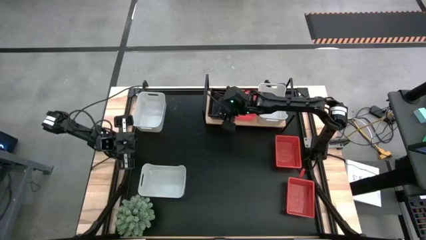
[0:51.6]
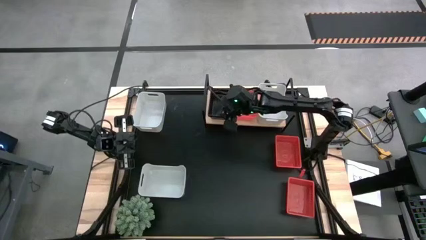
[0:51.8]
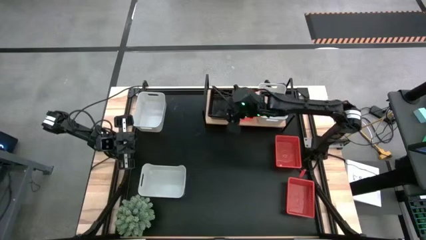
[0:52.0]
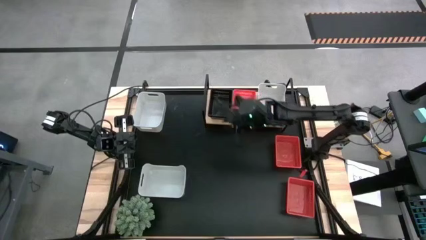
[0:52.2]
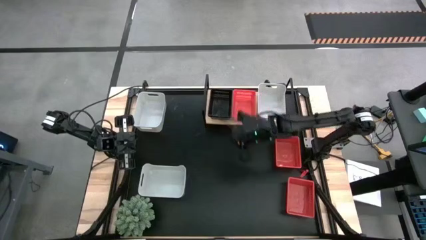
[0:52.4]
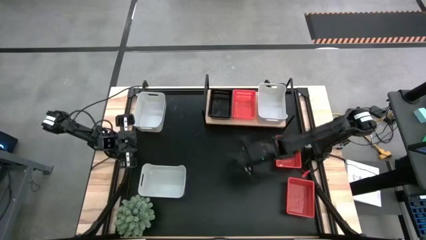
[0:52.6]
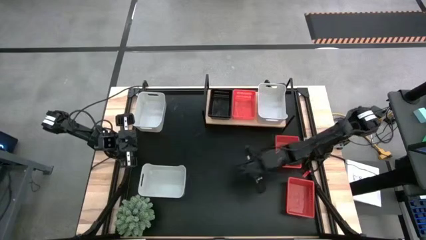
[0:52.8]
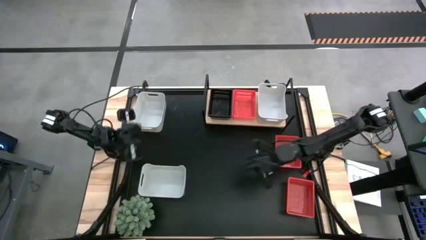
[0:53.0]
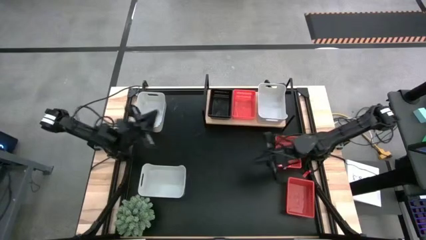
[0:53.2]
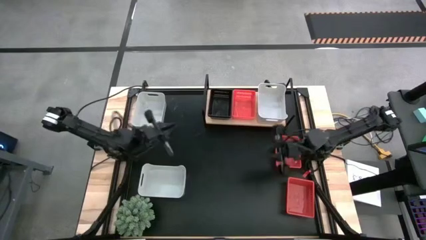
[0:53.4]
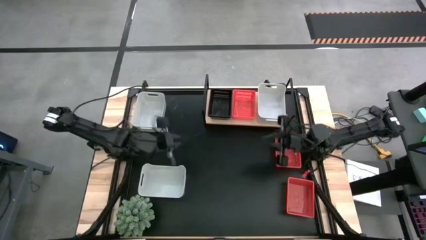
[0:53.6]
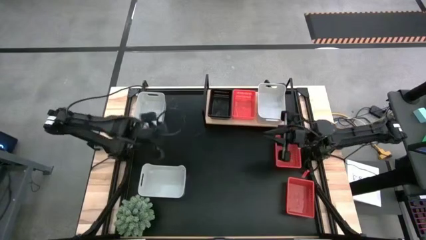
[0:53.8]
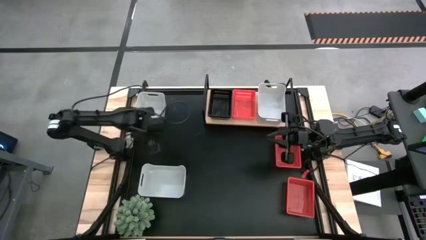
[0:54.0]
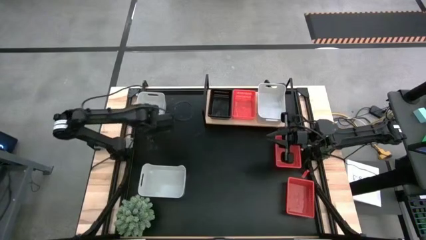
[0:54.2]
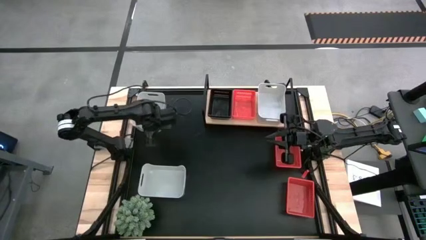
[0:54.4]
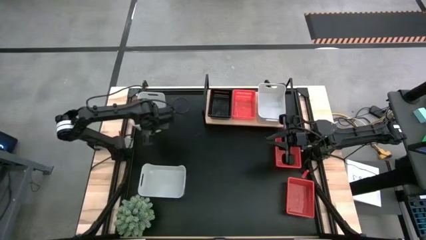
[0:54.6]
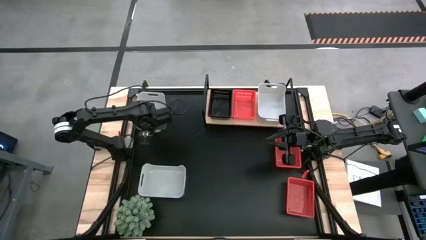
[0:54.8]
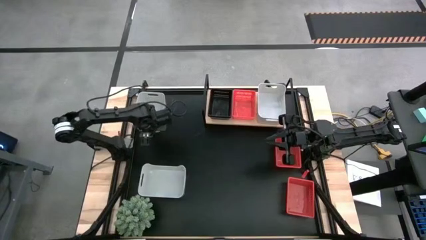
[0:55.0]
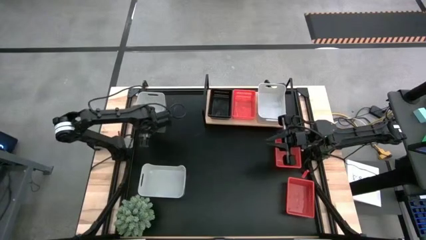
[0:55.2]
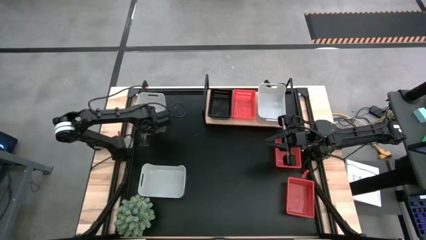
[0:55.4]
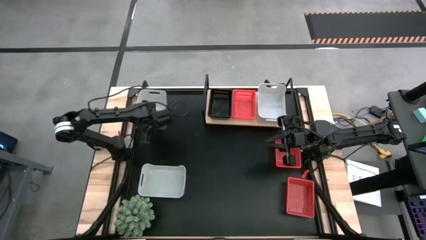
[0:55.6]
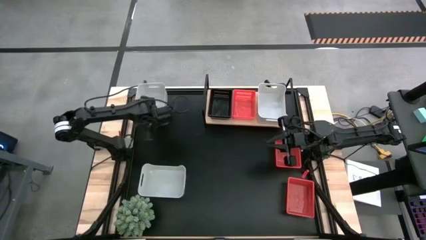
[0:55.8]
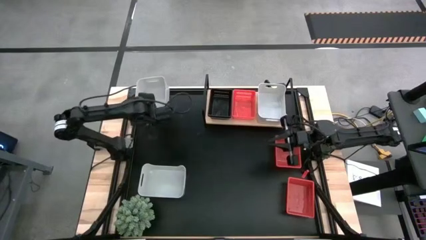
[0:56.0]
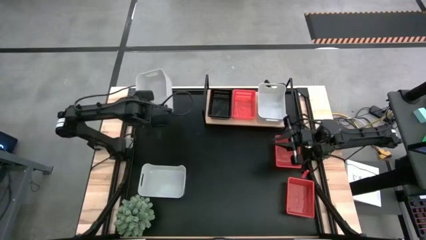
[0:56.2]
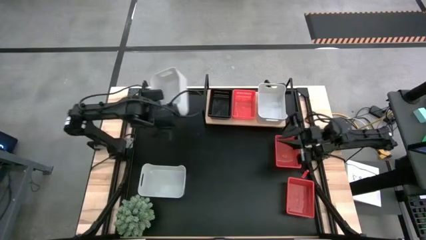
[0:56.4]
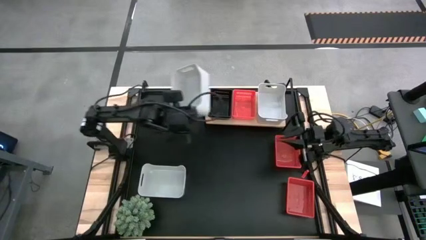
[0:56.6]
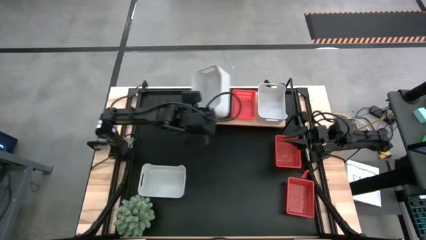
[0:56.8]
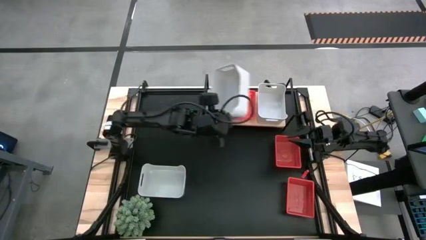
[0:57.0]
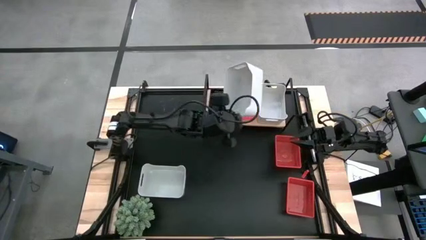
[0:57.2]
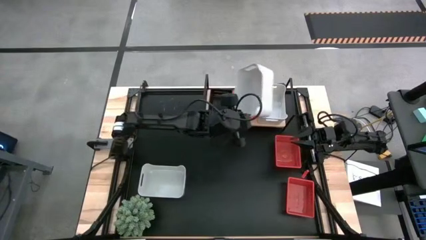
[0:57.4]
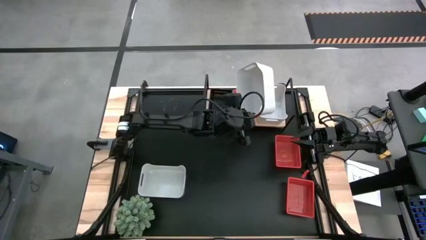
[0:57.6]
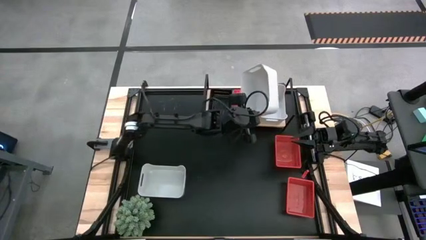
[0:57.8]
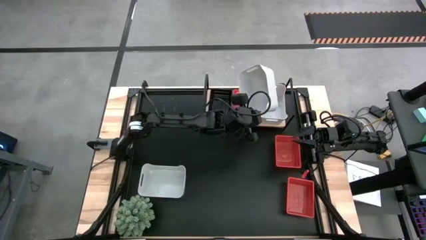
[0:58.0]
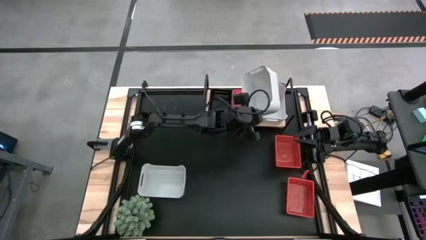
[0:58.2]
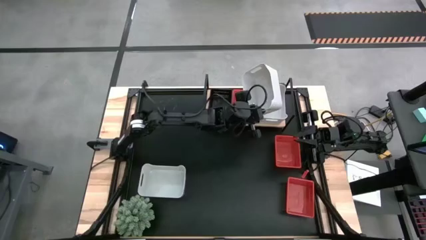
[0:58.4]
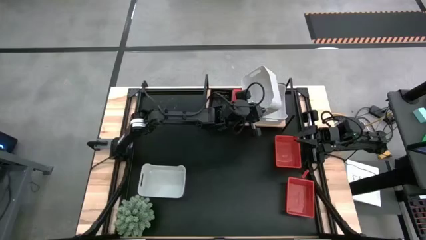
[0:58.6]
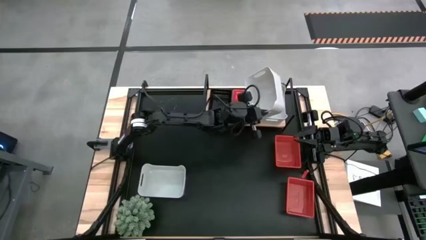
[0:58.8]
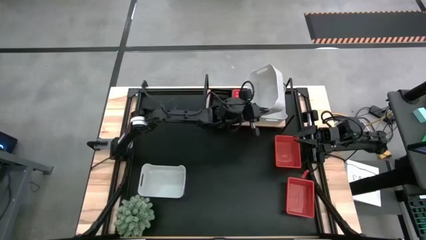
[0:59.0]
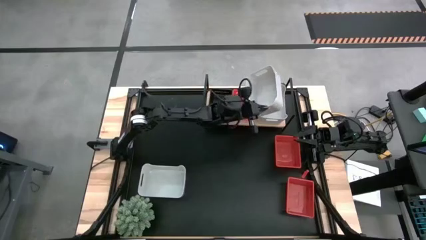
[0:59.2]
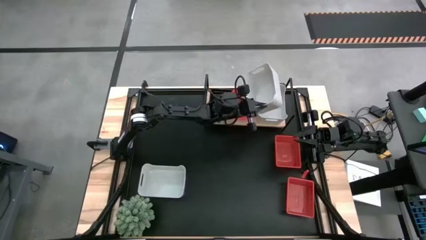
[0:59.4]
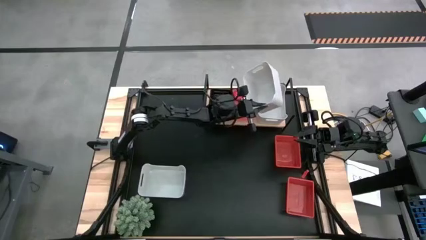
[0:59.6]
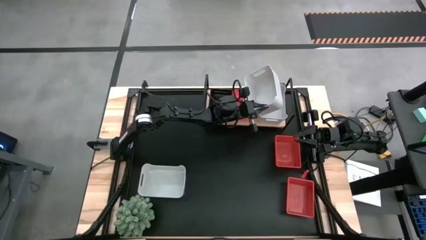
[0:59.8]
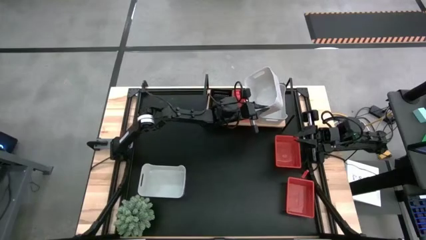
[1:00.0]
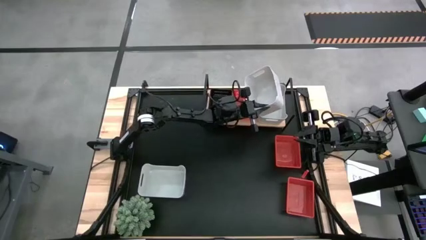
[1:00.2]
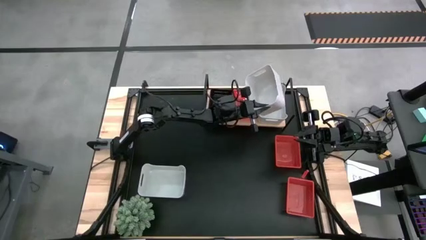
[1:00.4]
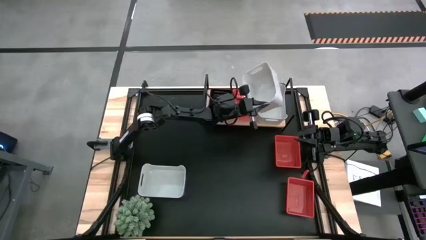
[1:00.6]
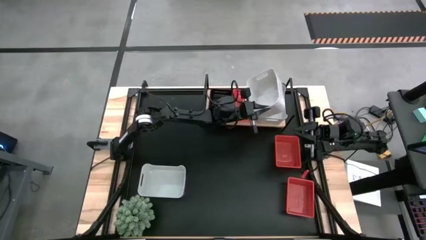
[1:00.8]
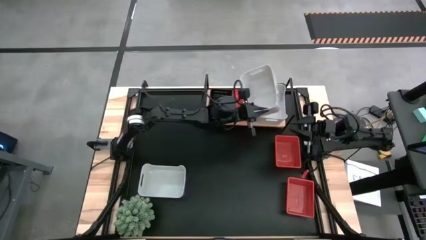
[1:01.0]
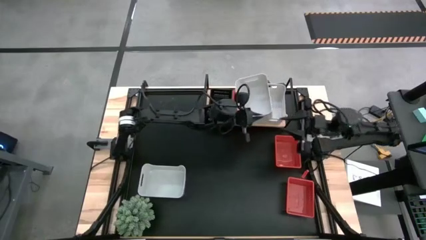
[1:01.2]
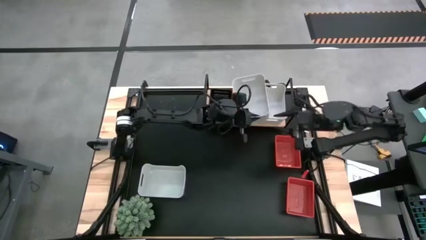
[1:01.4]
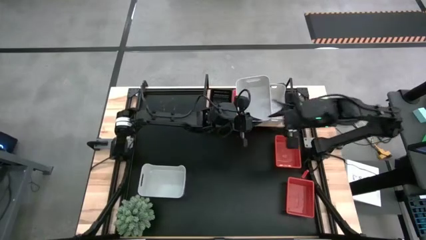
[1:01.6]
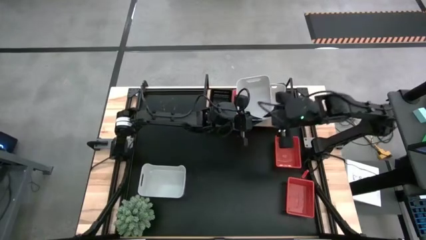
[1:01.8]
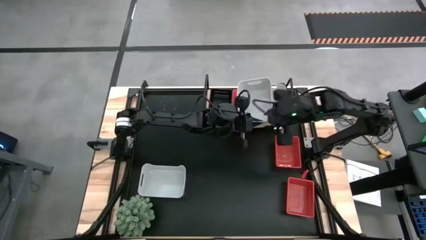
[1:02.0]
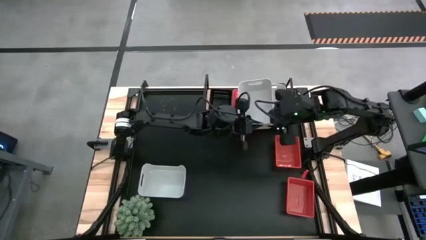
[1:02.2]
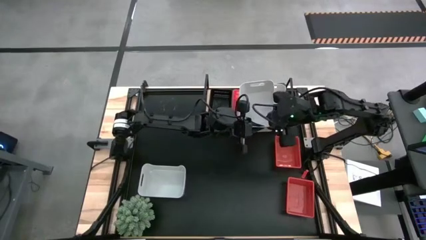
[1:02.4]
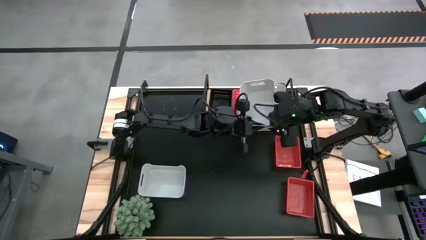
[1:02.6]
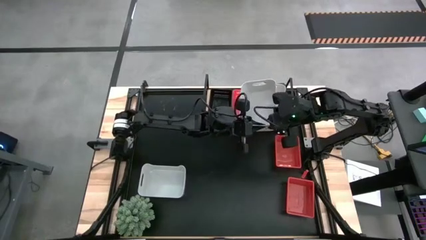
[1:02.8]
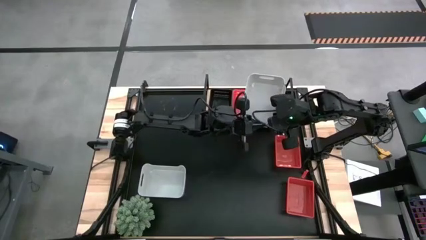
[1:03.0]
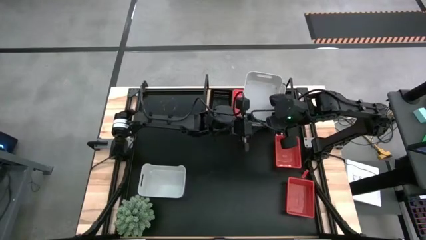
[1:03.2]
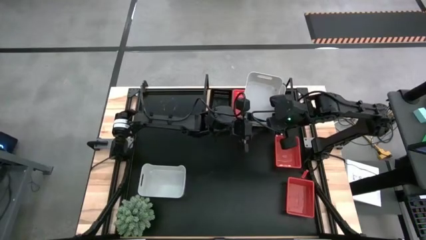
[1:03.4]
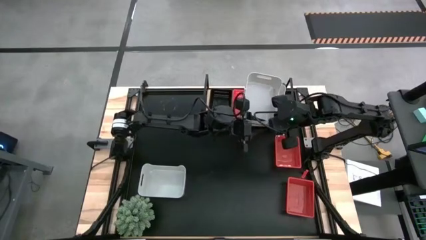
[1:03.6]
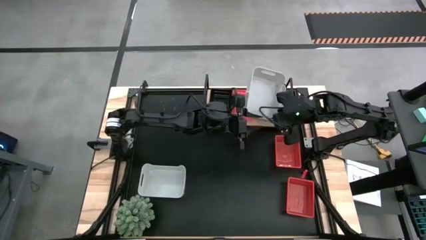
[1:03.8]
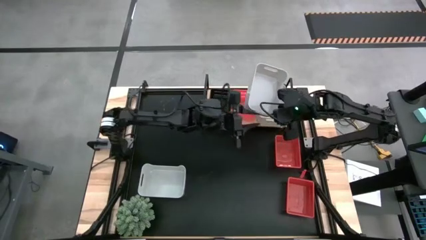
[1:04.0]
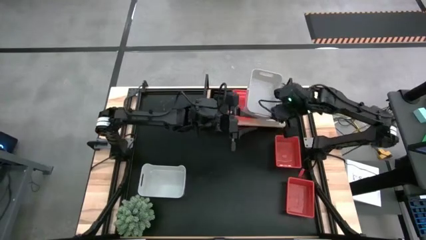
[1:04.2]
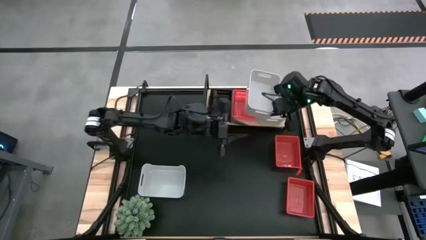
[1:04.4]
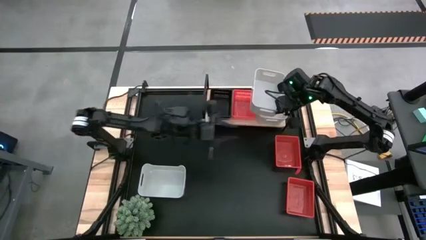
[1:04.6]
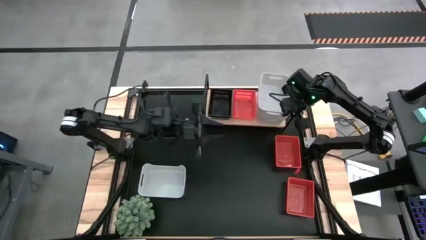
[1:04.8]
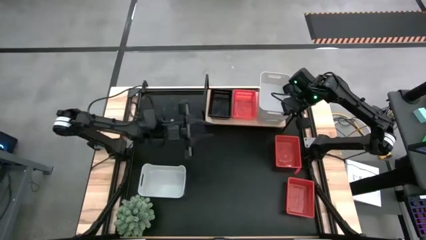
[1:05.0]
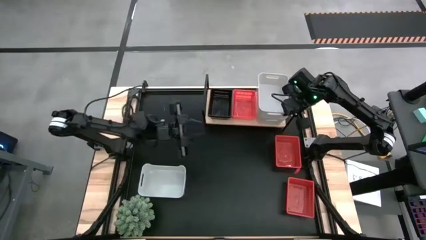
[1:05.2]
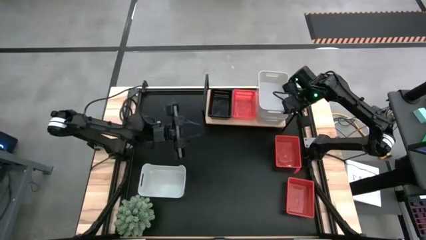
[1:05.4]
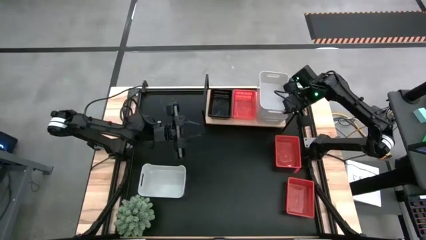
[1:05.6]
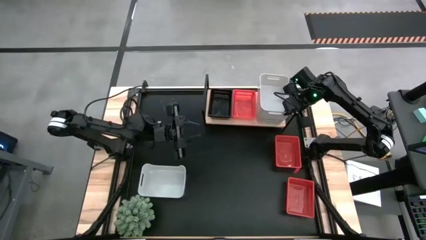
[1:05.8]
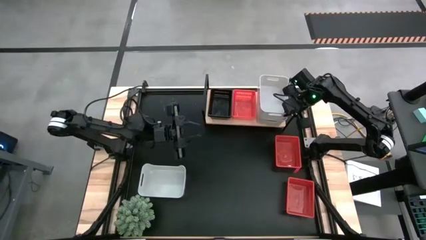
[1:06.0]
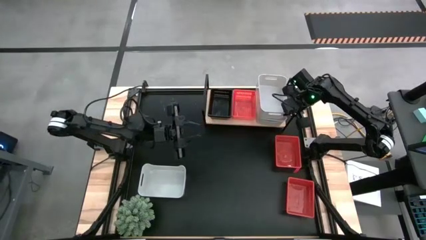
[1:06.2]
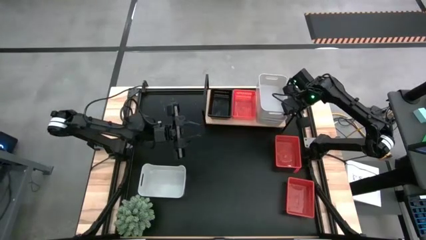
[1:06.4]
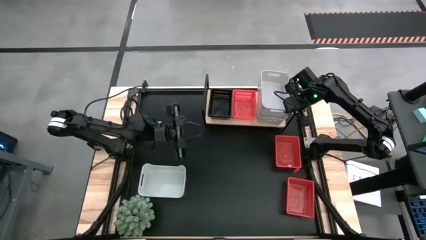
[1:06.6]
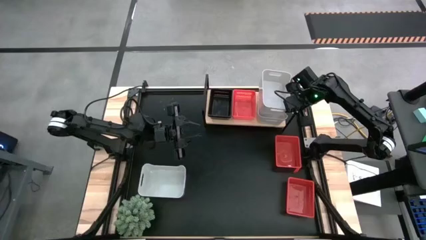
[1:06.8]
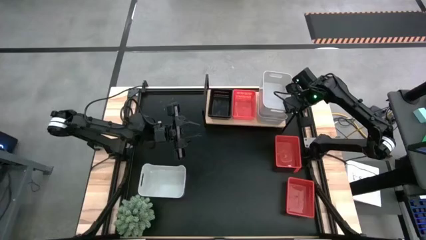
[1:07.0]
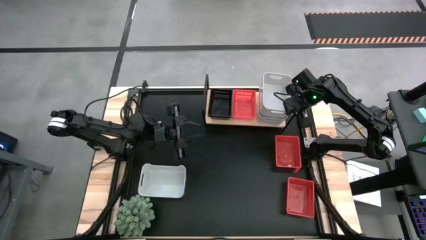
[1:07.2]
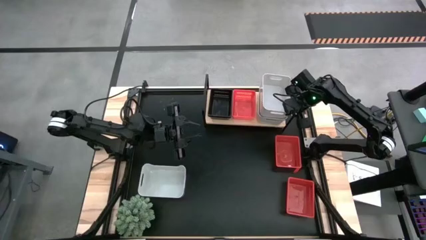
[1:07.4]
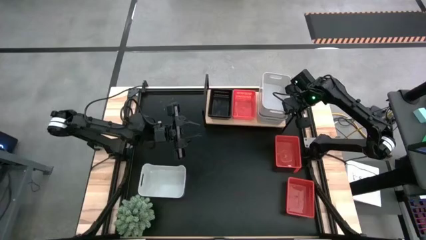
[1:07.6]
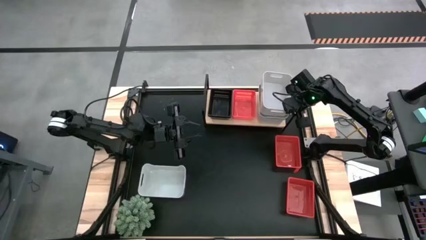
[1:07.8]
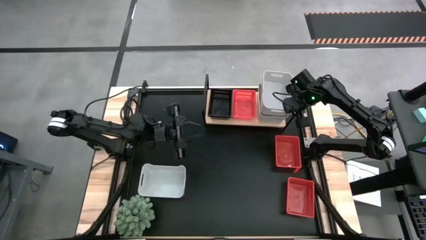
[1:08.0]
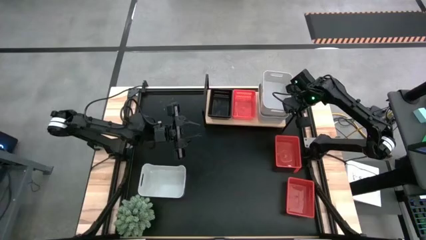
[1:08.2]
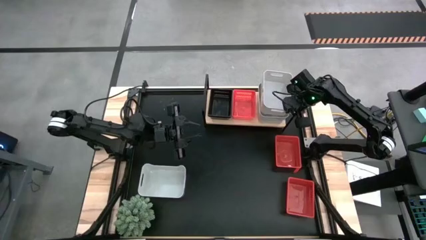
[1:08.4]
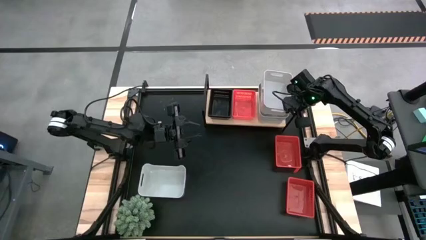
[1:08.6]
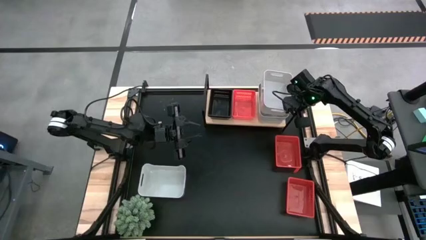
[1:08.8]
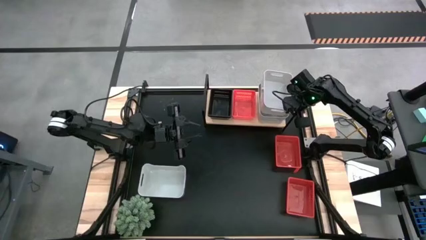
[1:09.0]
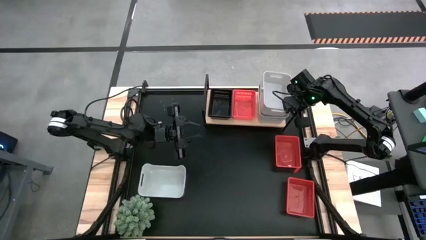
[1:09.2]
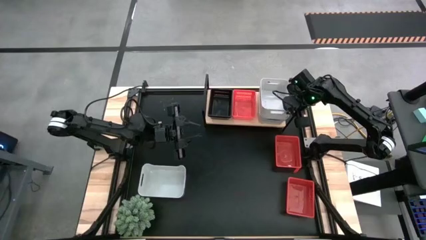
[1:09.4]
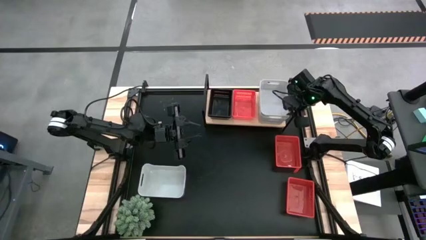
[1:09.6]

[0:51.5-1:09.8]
Task: Stack baskets on shelf by color
Stack the top white bin into the top of the white bin on the shelf
